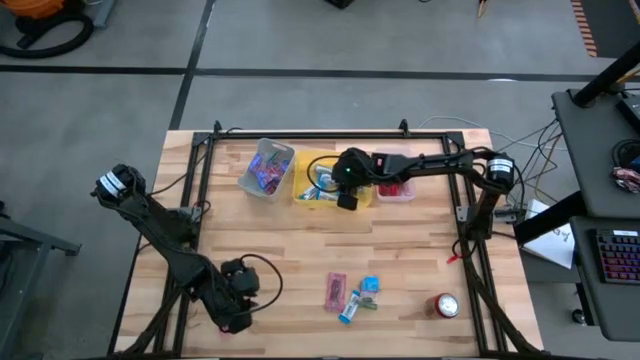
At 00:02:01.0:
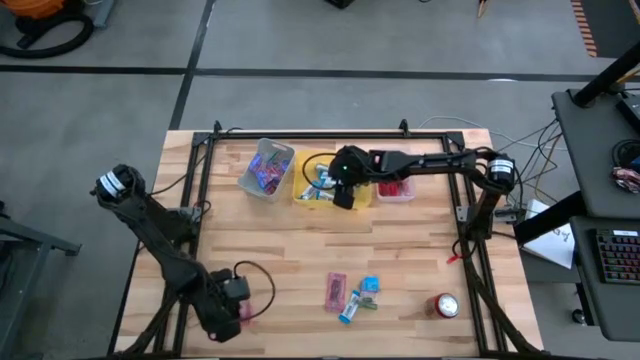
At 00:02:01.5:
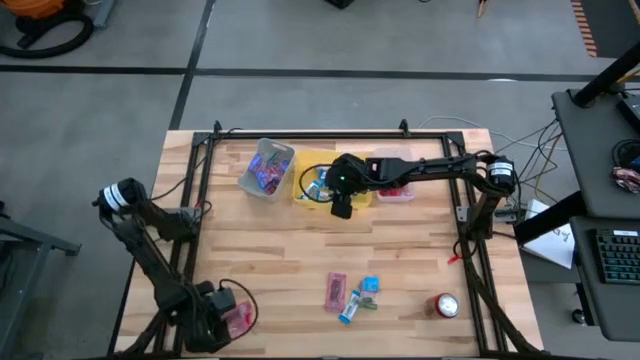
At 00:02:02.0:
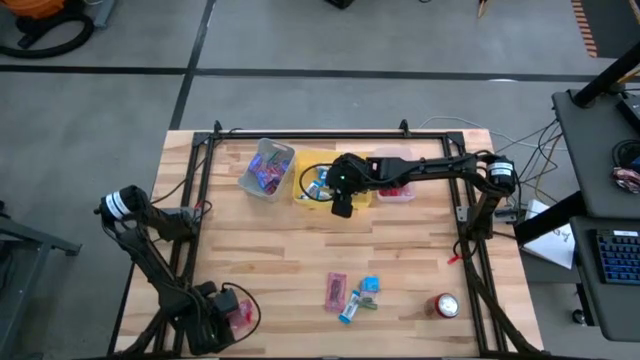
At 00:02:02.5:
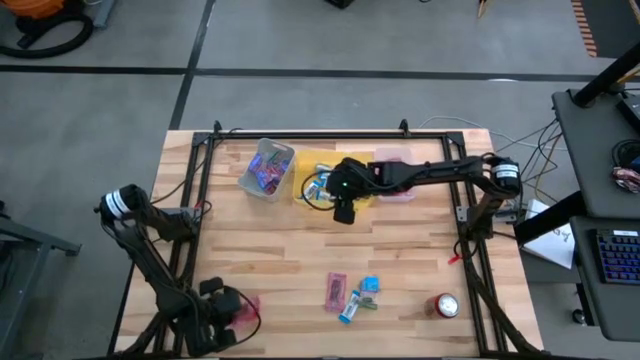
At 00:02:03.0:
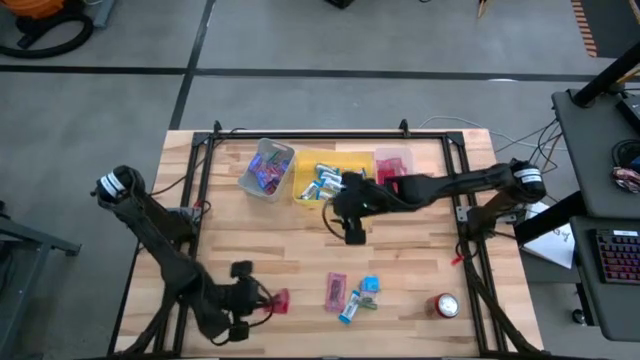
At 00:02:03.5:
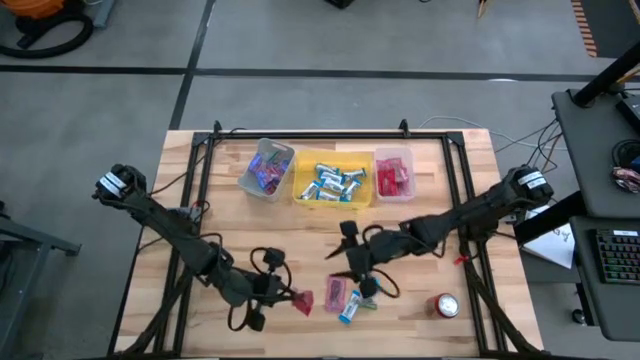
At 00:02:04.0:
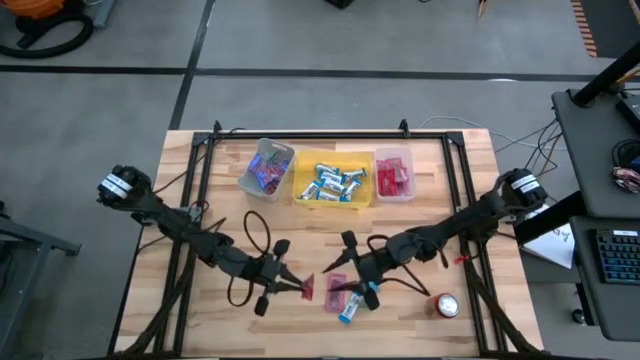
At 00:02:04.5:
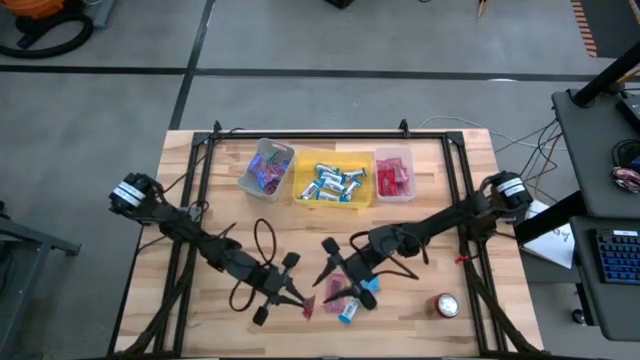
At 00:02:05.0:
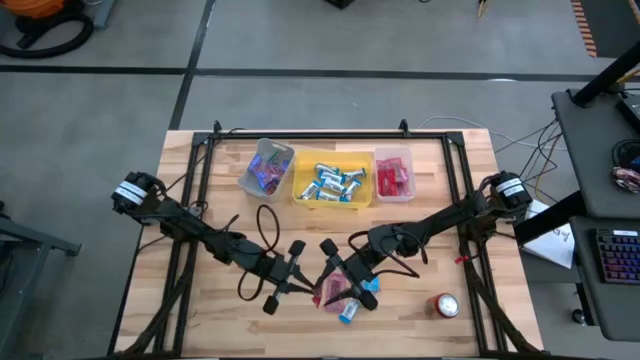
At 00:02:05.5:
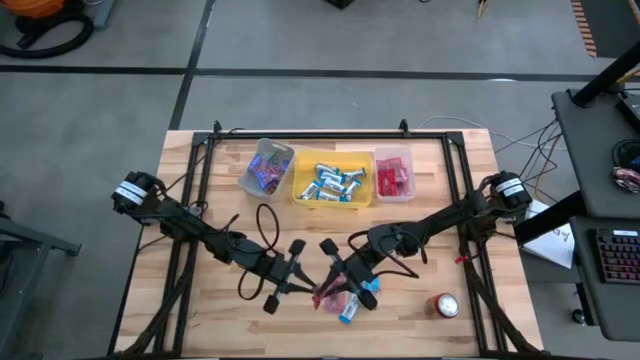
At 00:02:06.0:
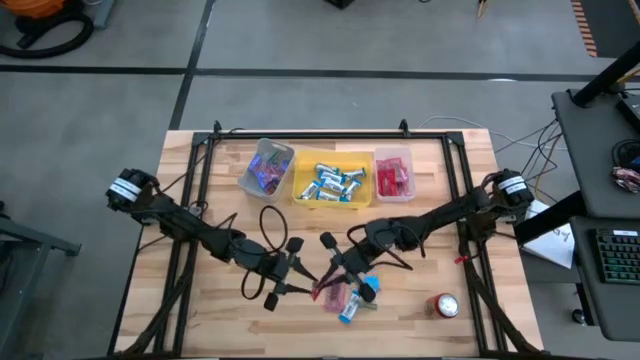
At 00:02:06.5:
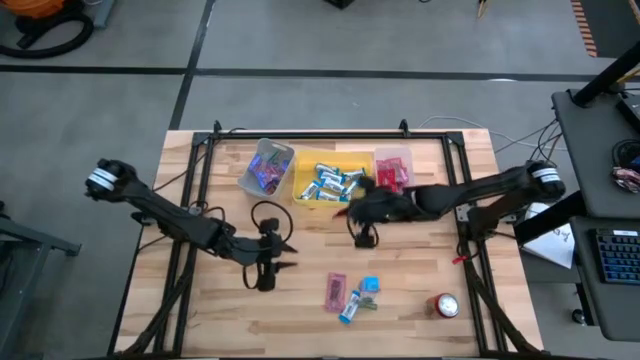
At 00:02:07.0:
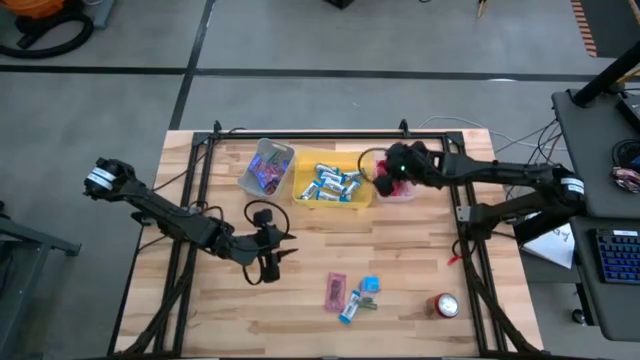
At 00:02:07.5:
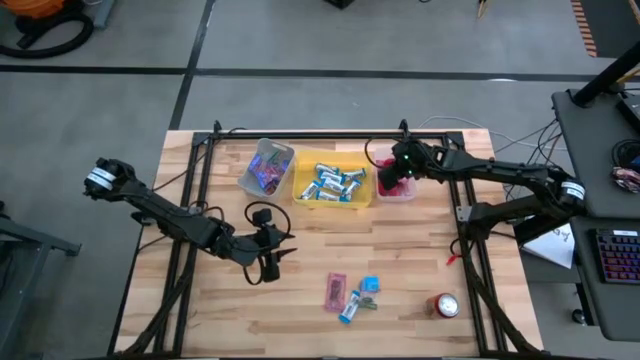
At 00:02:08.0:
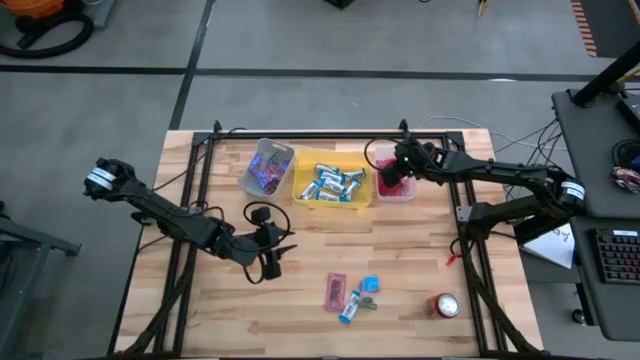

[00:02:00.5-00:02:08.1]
Task: Sort candy
Put the red candy into the transparent bin

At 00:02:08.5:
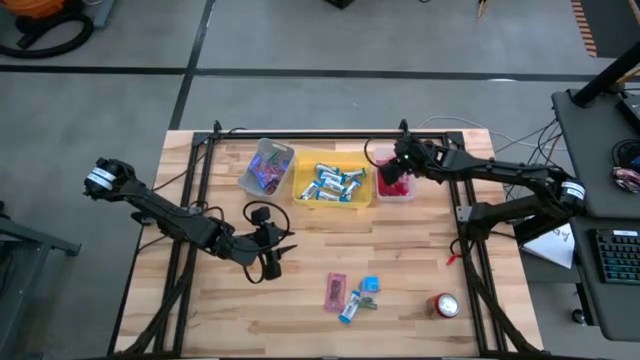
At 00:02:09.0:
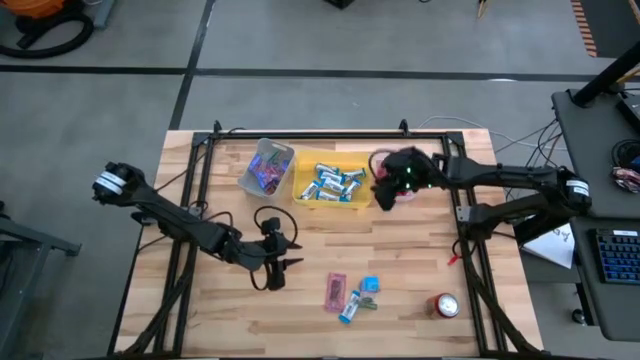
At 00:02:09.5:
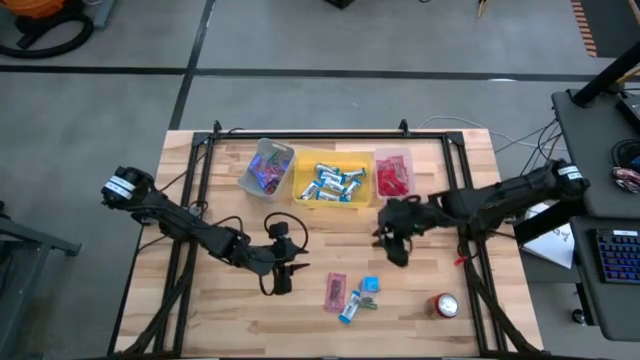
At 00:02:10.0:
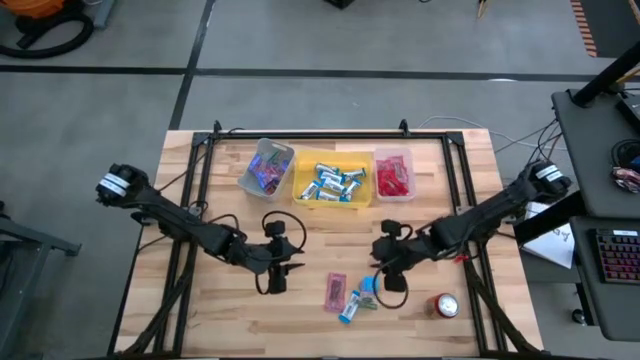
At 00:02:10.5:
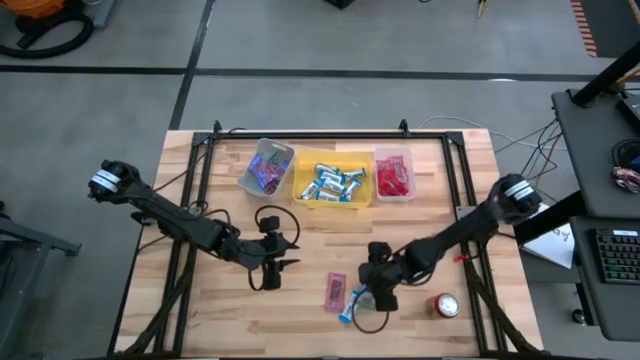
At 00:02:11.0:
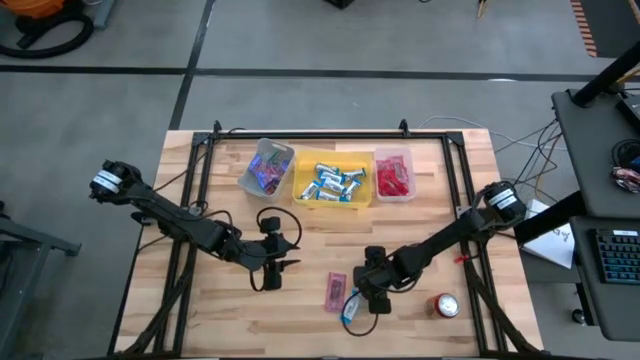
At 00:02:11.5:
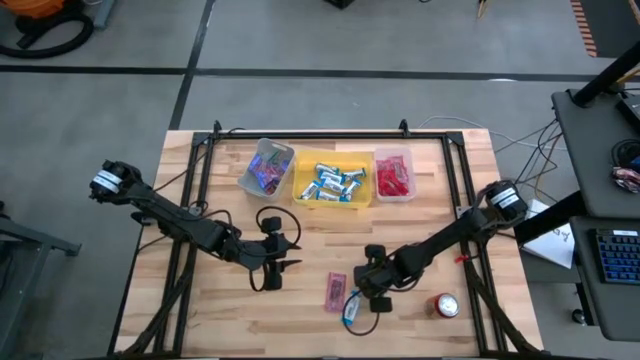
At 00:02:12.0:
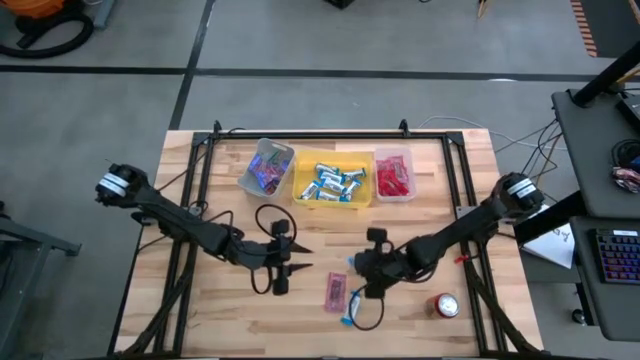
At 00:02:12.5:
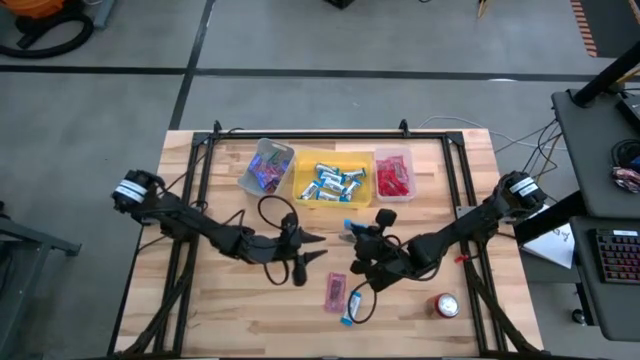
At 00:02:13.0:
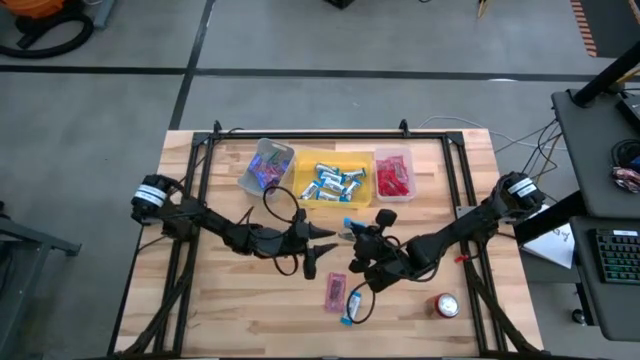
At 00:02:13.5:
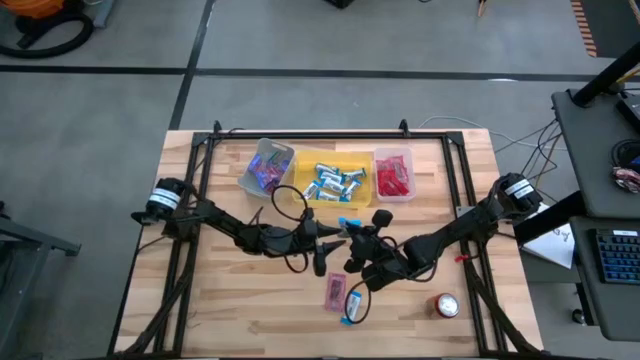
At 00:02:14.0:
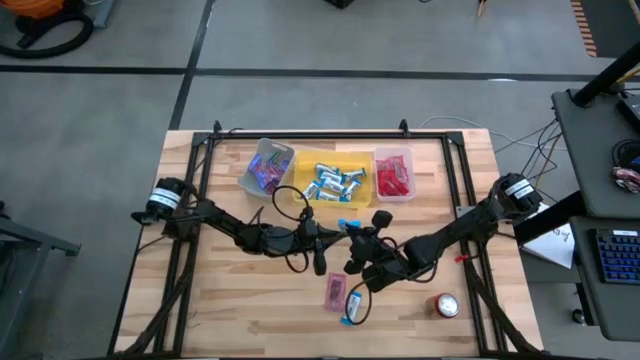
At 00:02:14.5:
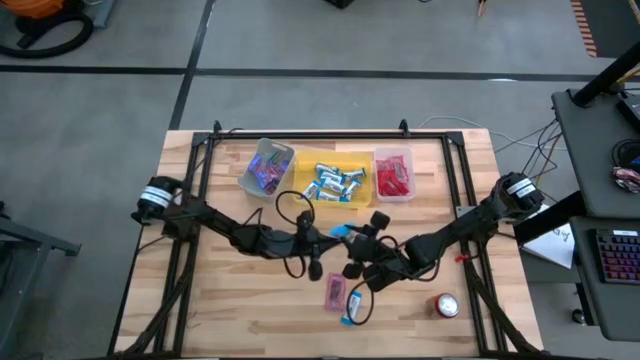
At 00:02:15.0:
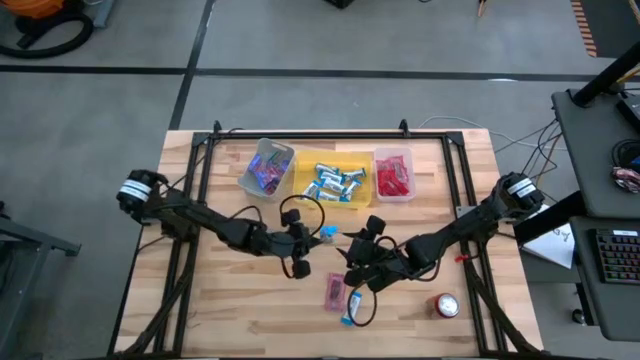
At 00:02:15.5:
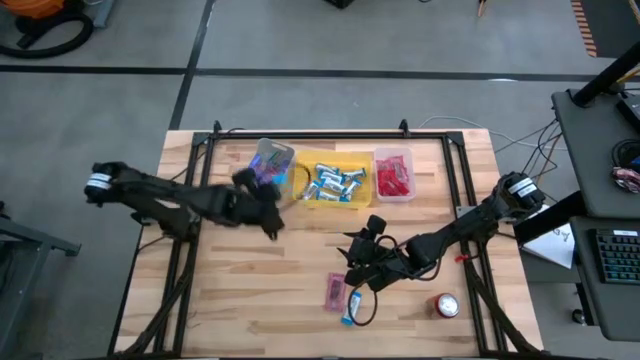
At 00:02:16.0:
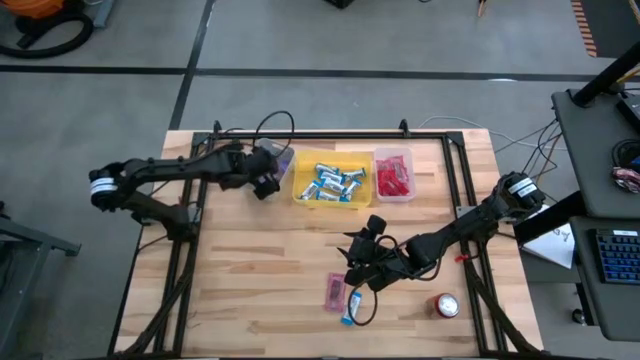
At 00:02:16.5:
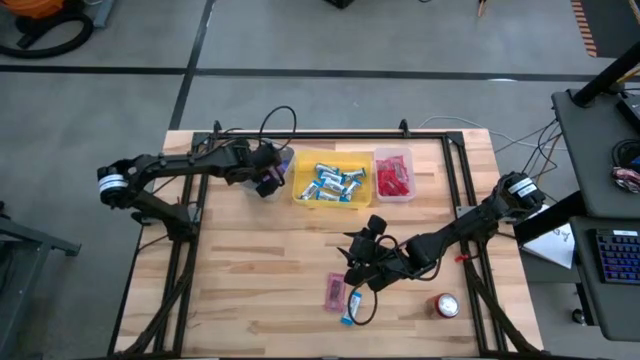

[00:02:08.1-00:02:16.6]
Put the blue candy into the gray bin

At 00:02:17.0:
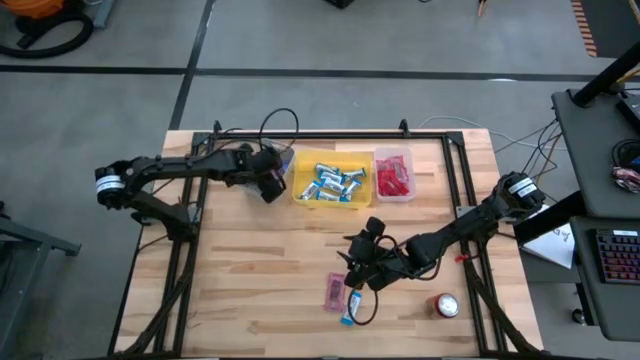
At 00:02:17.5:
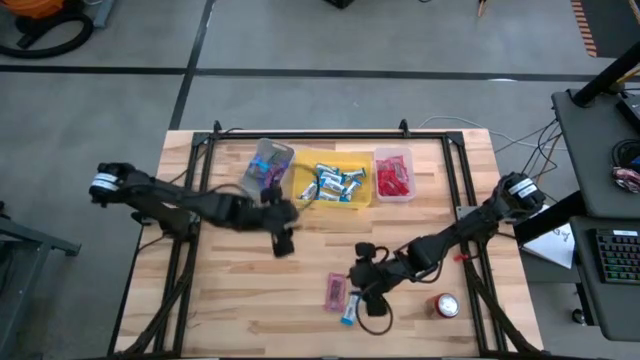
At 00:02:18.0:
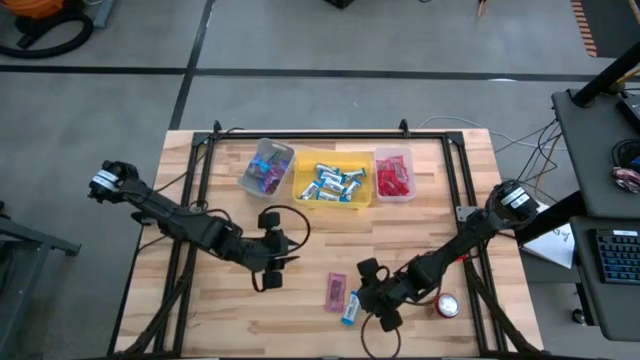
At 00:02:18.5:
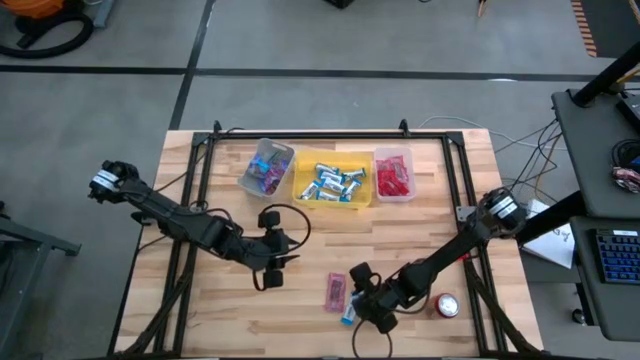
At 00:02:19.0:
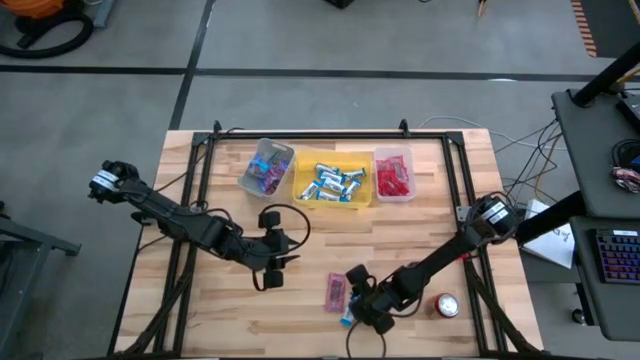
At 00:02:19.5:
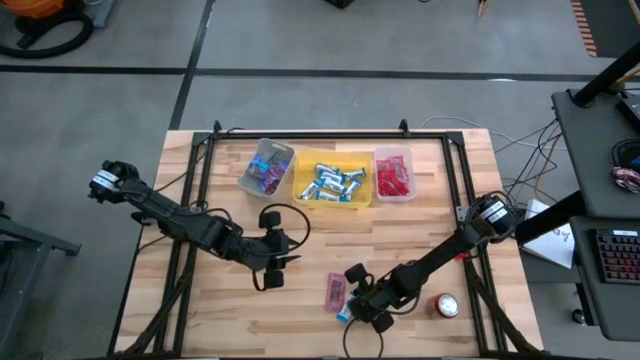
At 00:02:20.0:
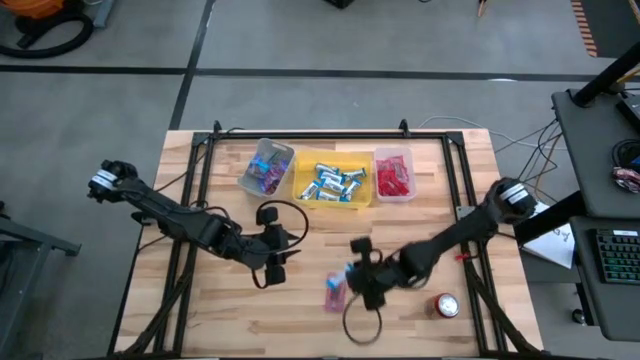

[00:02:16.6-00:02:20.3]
Put the white chocolate into the yellow bin
